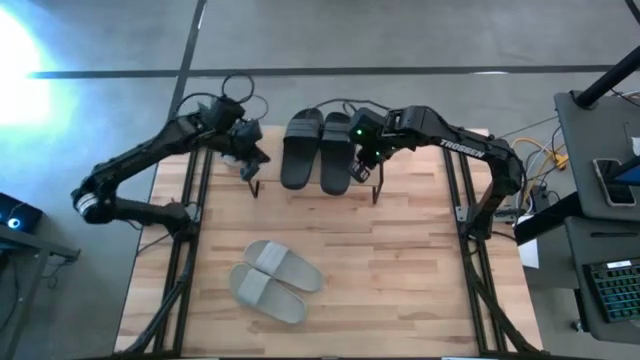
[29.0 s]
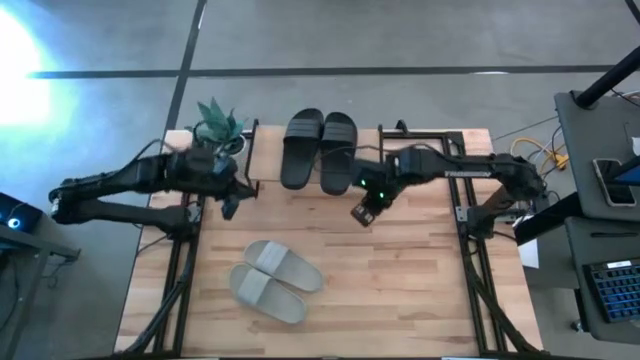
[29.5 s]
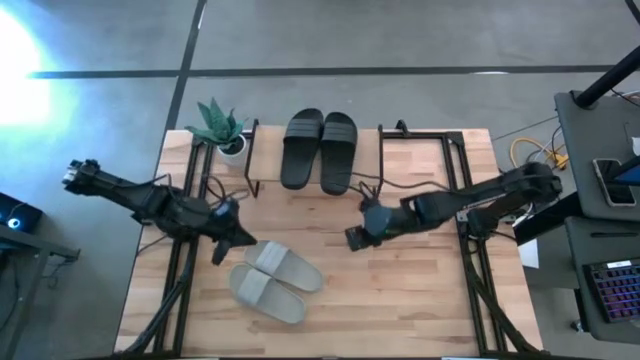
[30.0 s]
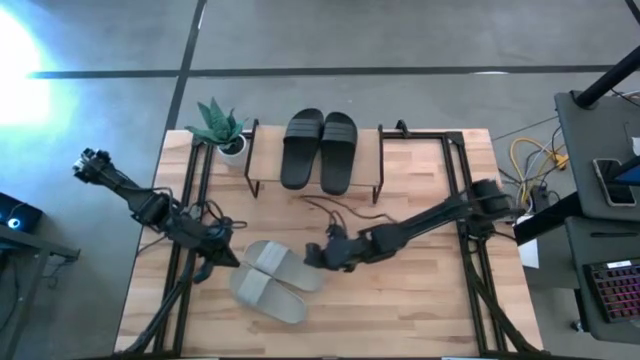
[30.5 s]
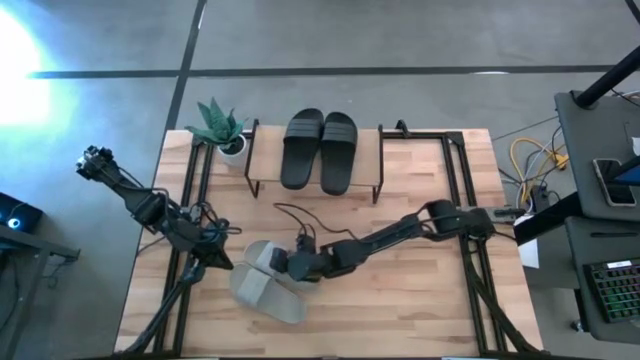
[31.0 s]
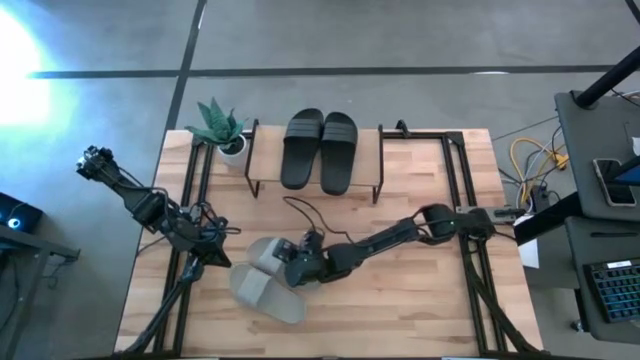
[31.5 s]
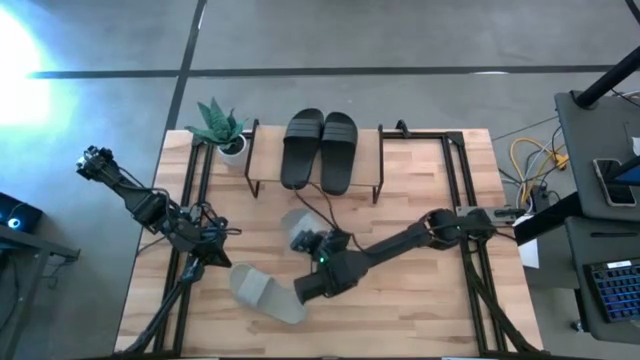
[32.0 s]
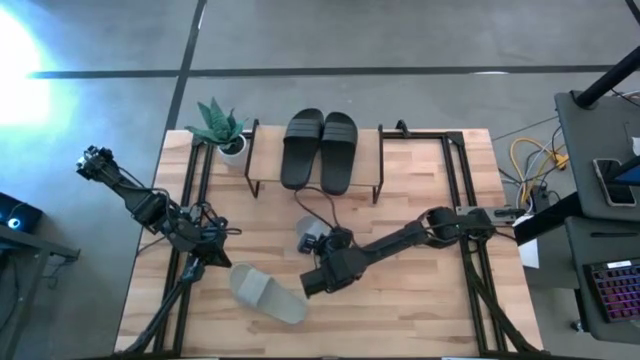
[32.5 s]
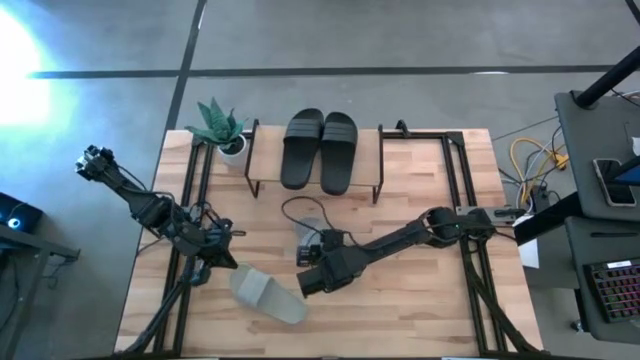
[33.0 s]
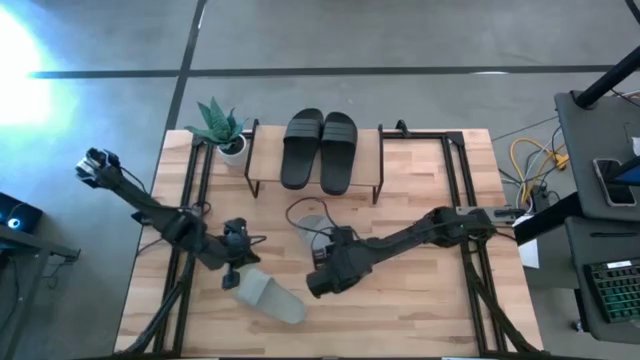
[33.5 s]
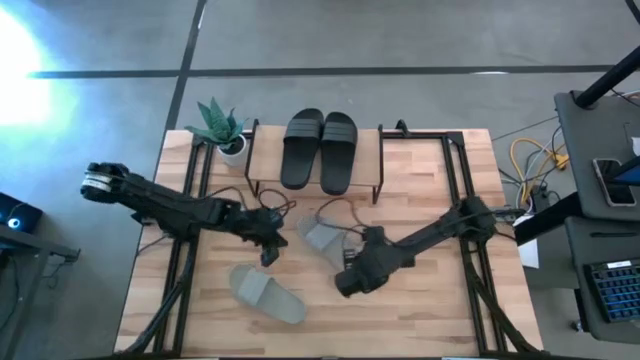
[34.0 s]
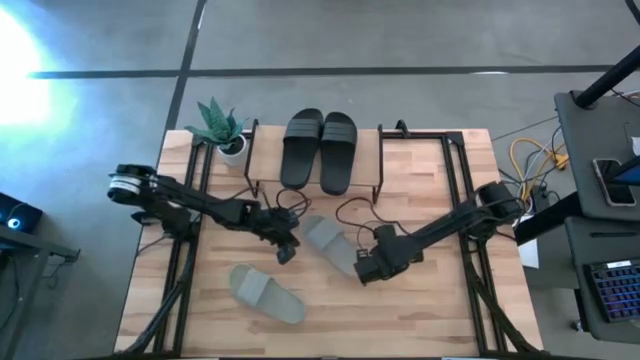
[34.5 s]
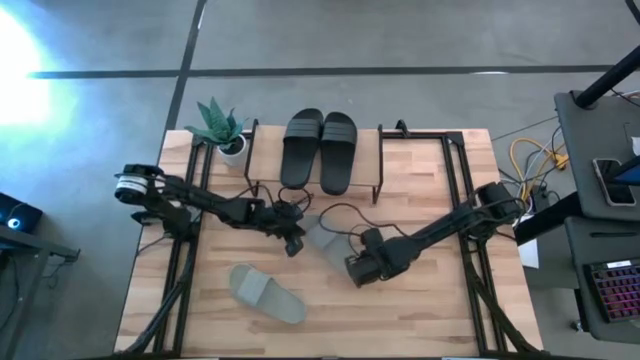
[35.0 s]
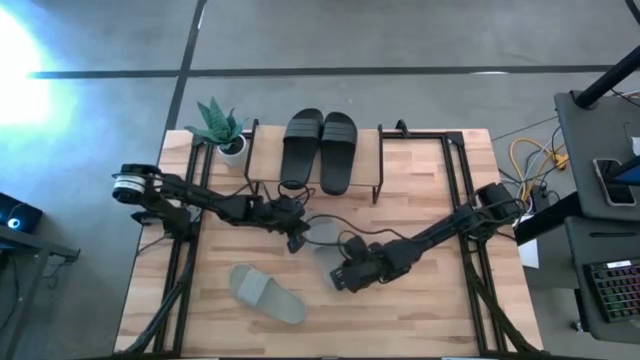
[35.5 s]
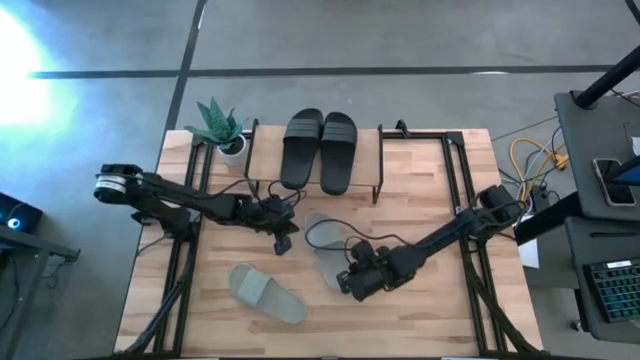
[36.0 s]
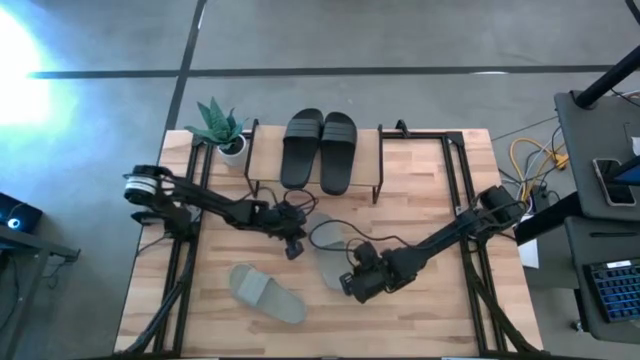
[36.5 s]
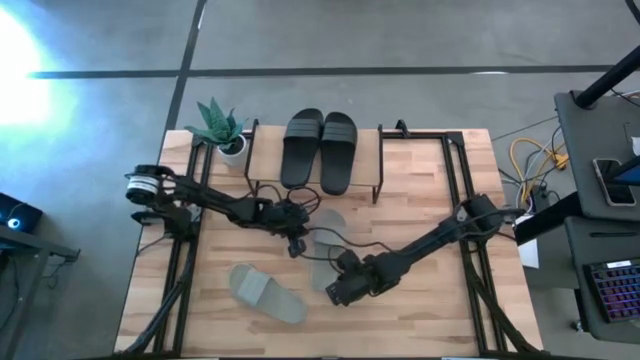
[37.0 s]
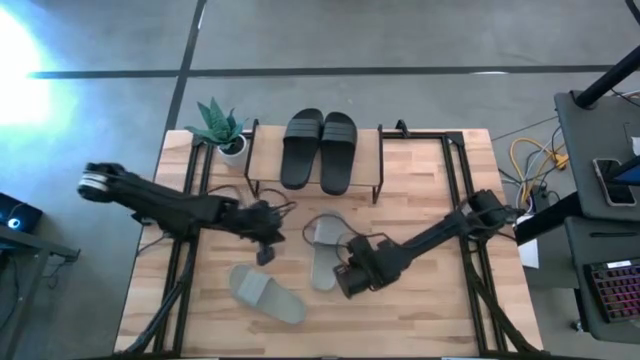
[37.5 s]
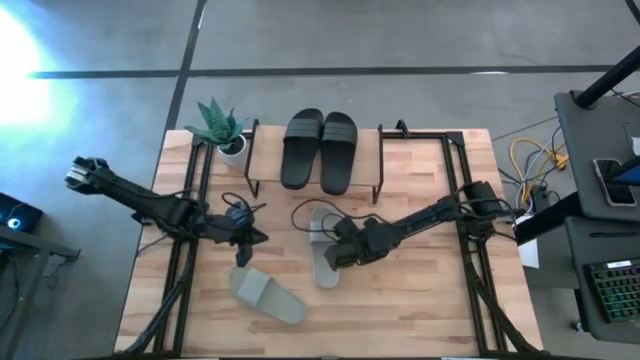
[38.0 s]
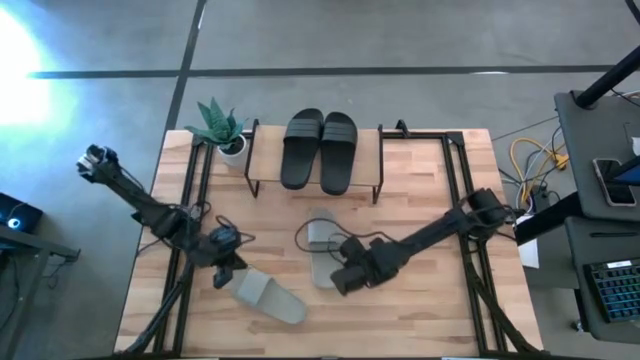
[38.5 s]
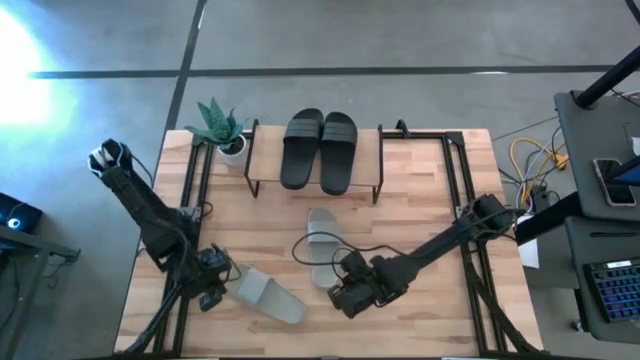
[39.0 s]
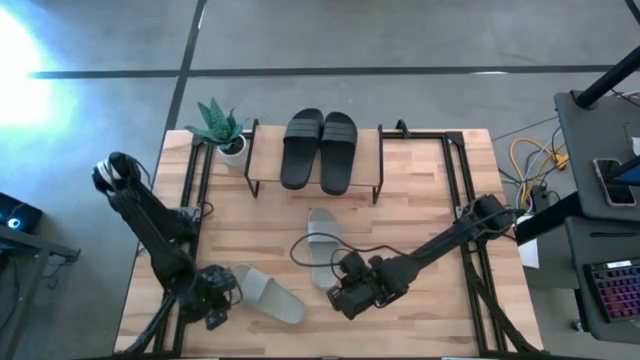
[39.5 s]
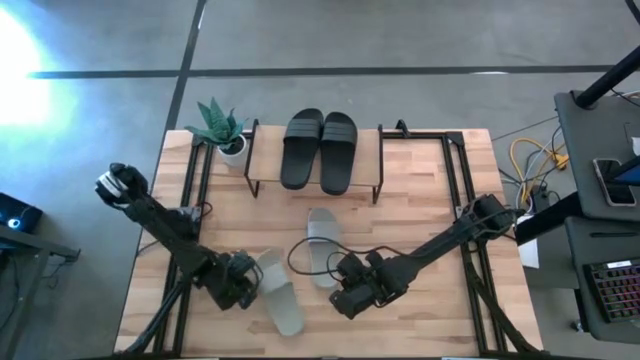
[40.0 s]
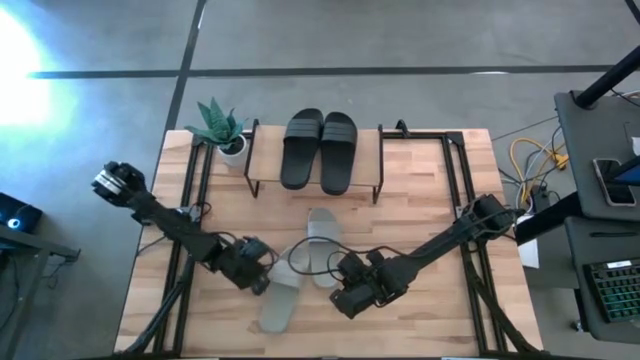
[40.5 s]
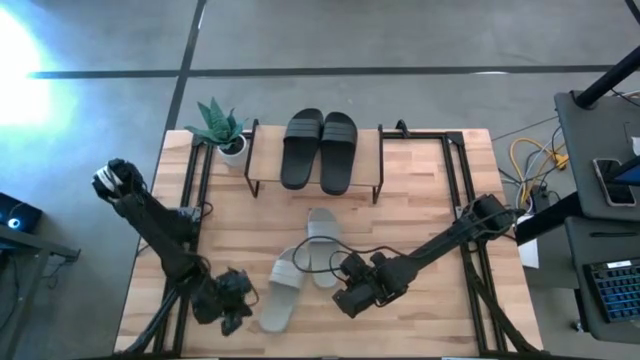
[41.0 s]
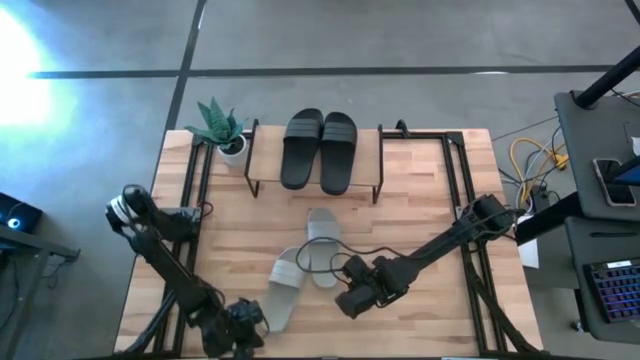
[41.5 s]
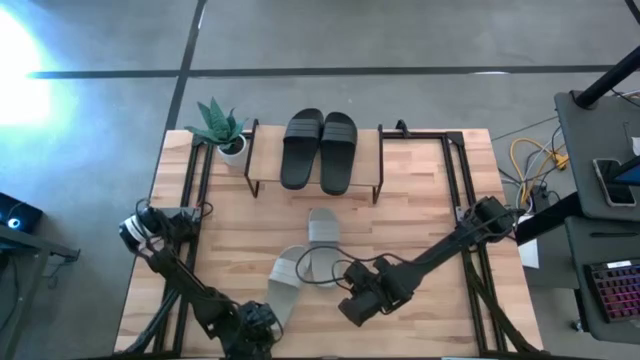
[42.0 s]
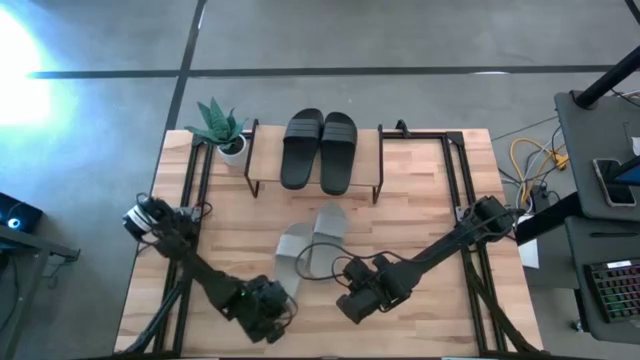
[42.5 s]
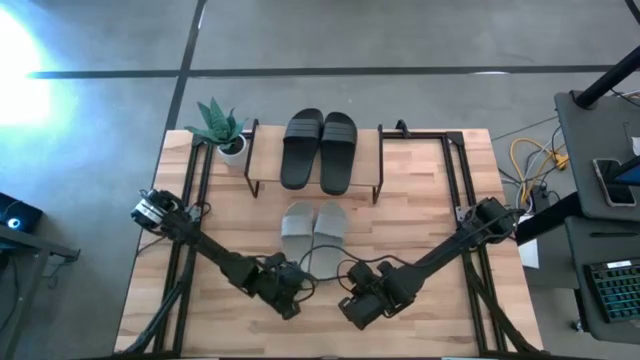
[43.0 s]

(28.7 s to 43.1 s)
Task: Pick and place slides into the shelf
Prepare the gray slippers

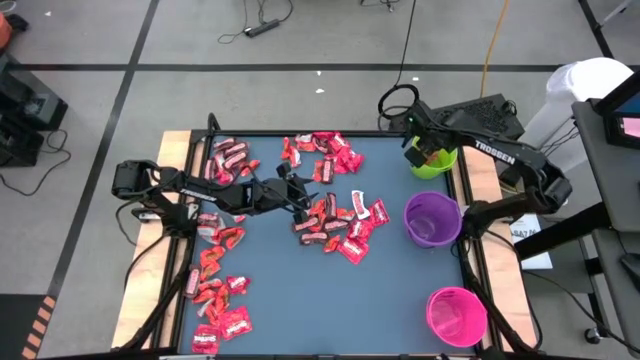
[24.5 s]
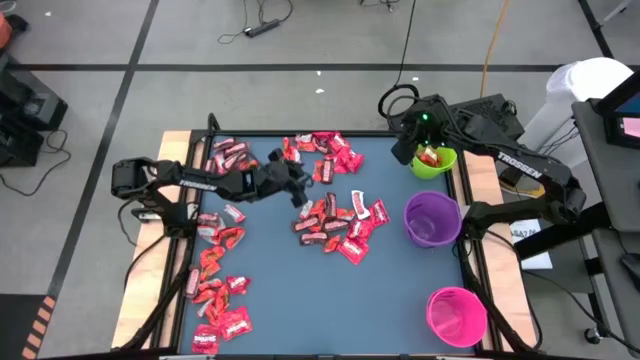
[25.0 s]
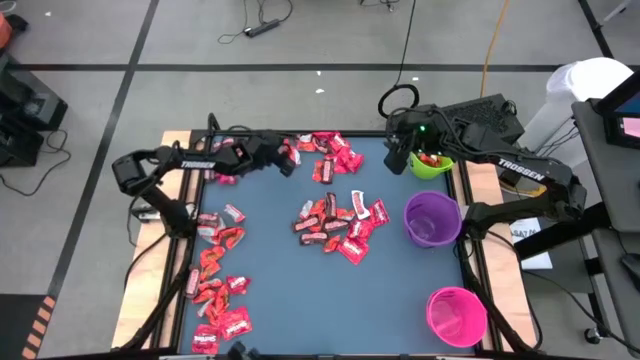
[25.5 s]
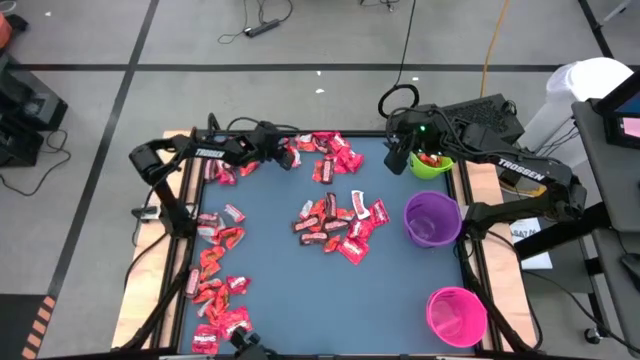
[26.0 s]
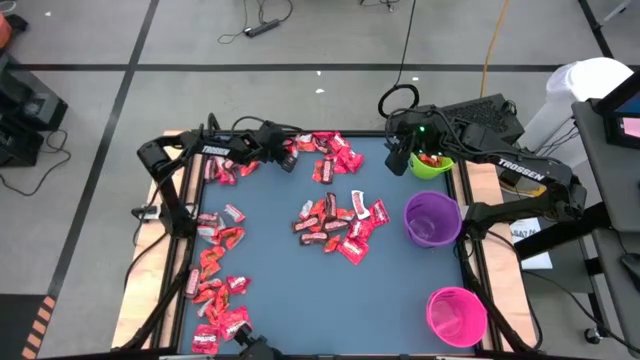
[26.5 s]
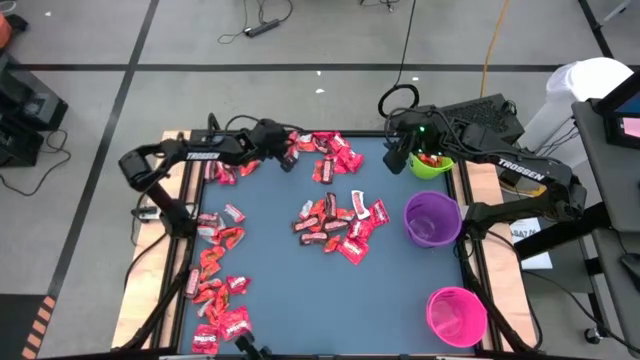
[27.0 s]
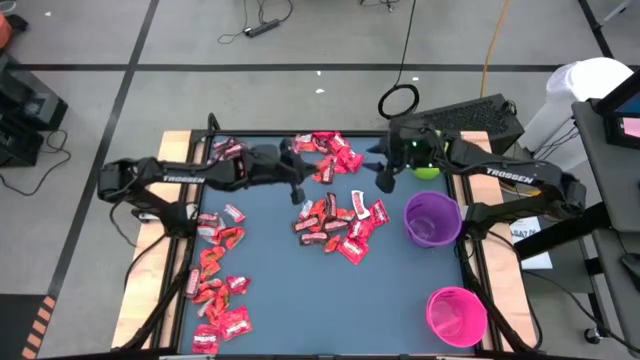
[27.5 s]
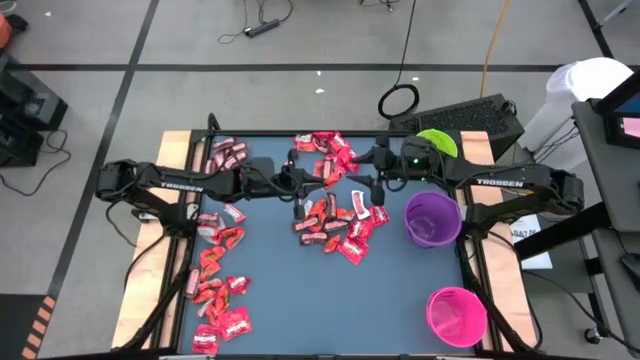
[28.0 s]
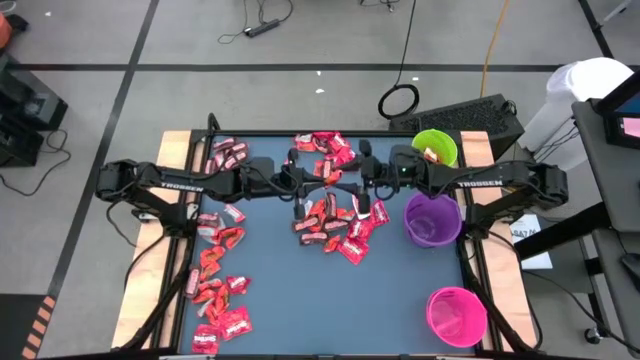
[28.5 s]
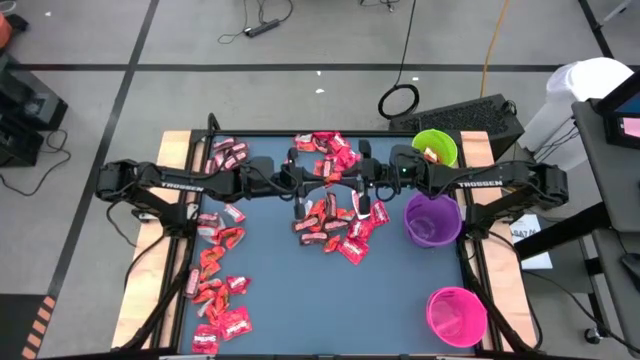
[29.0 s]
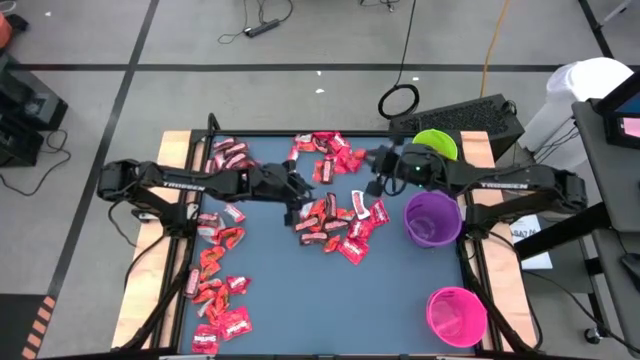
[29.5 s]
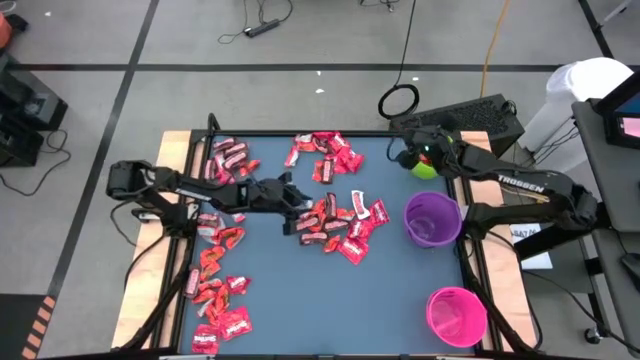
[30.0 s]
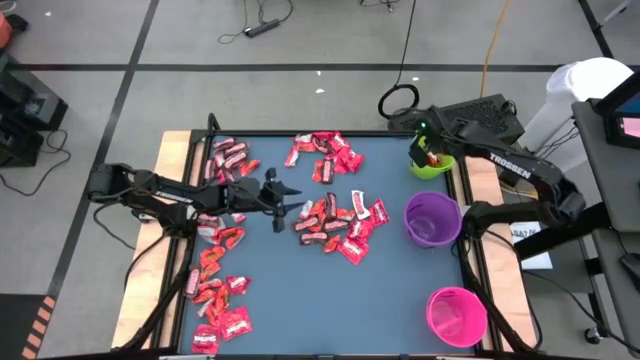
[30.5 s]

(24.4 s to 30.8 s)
Task: Organize candy in baskets
Put the orange chocolate bar into the green bucket
